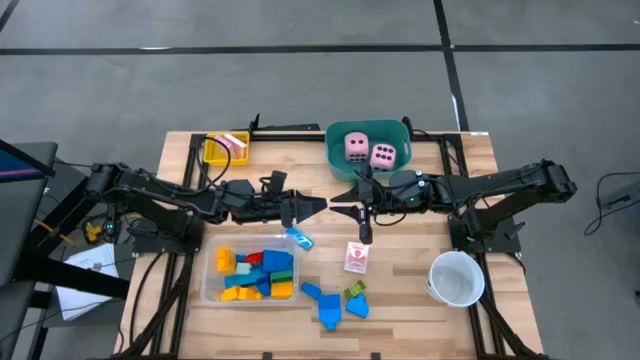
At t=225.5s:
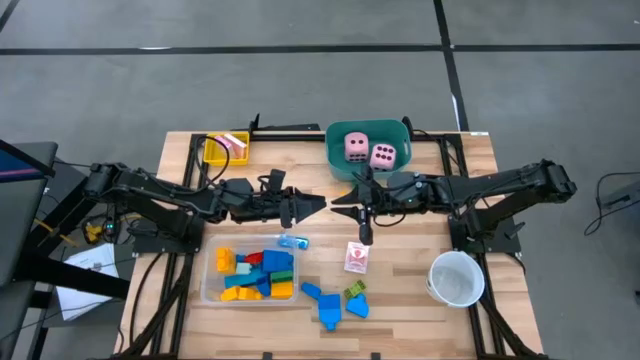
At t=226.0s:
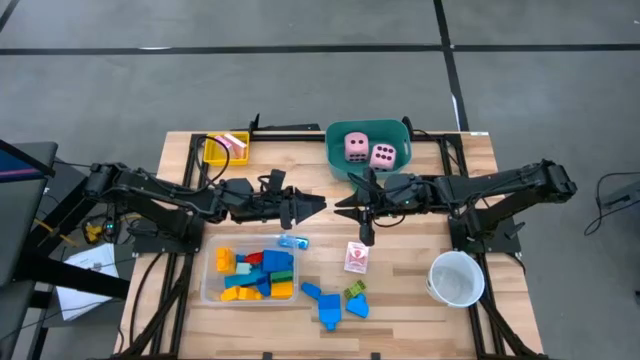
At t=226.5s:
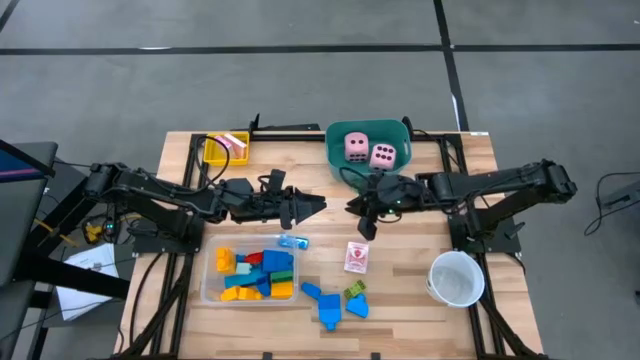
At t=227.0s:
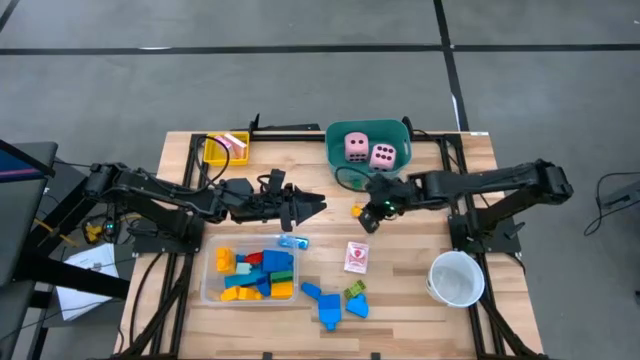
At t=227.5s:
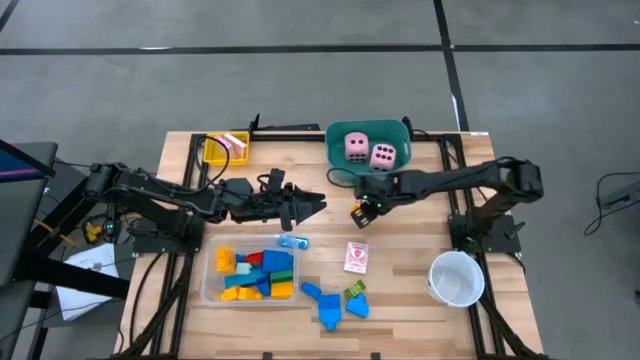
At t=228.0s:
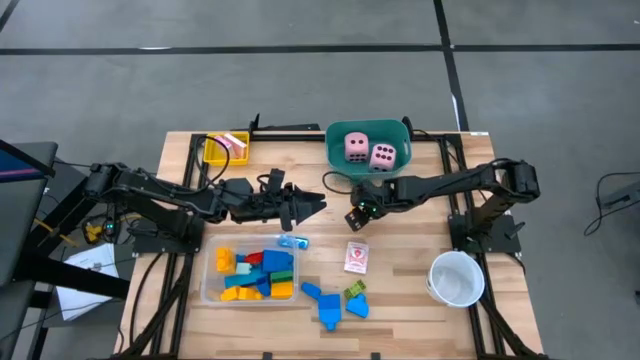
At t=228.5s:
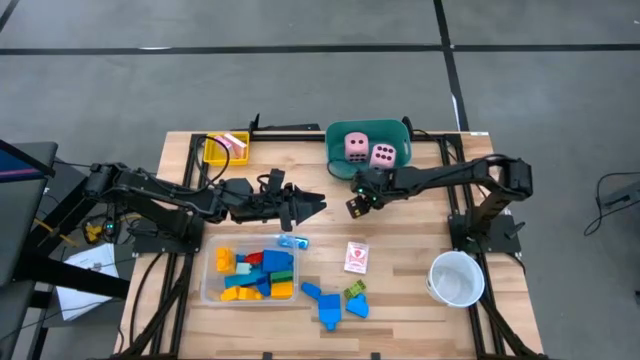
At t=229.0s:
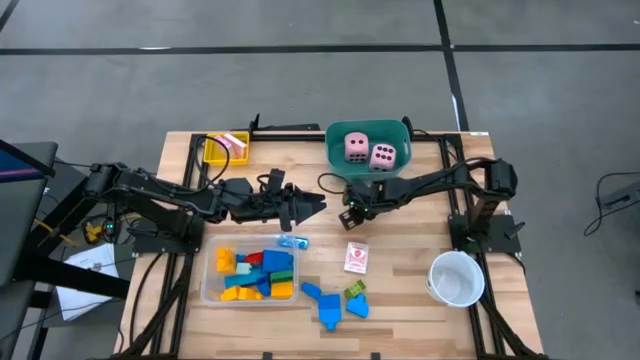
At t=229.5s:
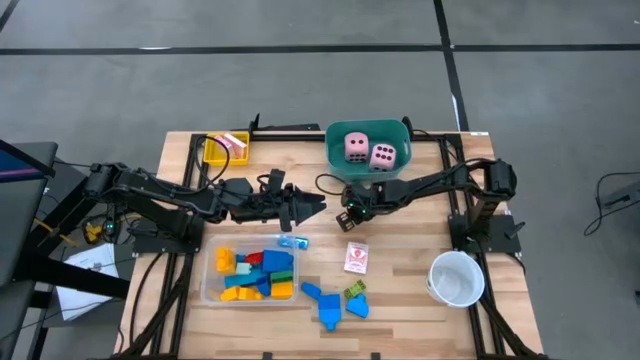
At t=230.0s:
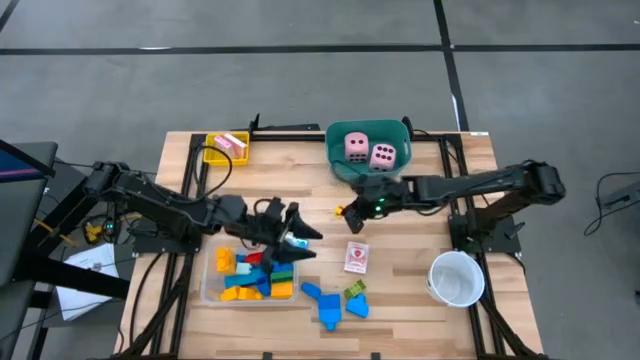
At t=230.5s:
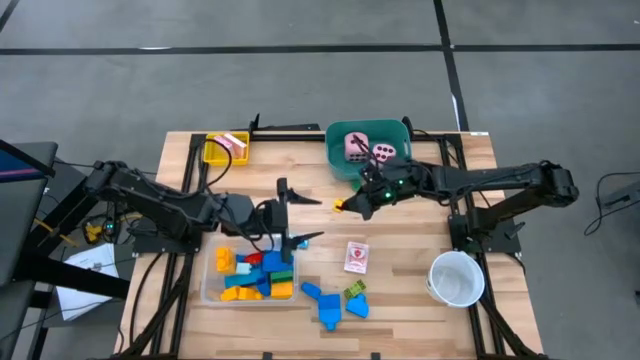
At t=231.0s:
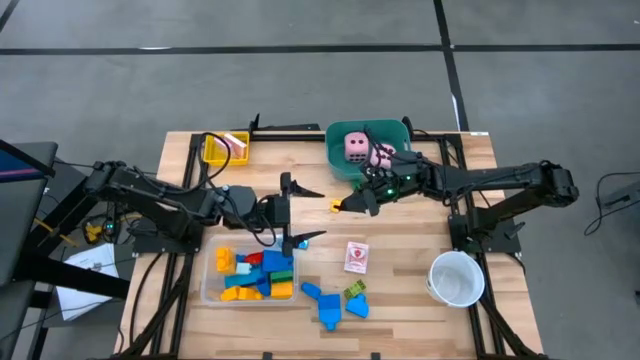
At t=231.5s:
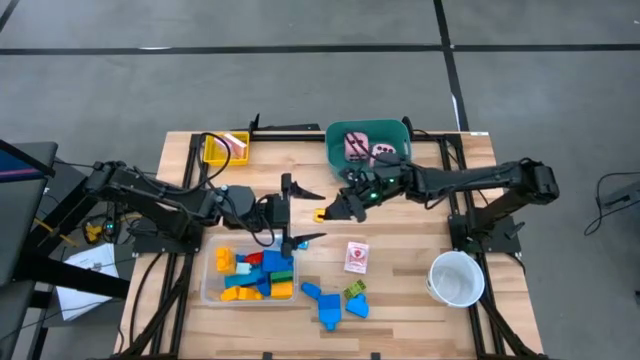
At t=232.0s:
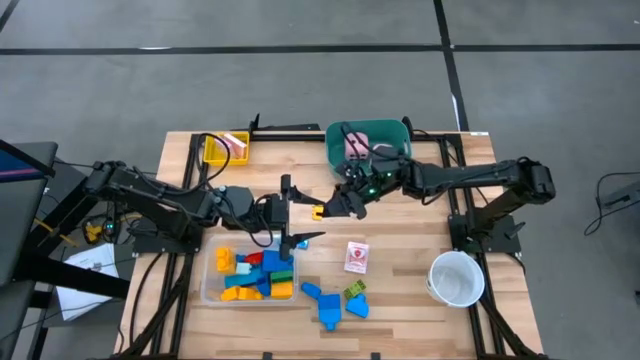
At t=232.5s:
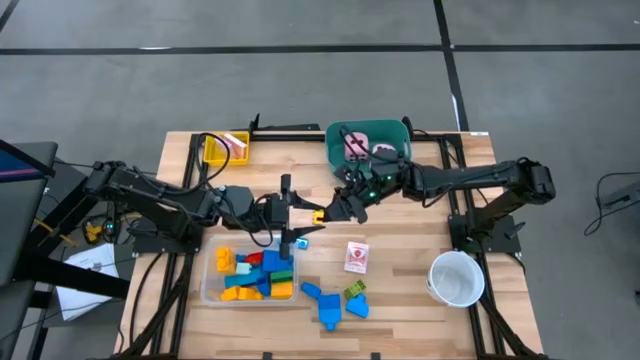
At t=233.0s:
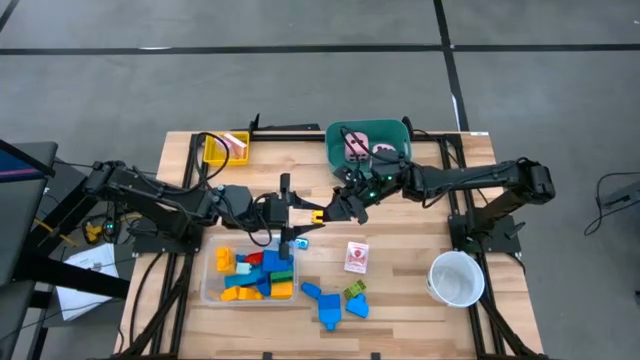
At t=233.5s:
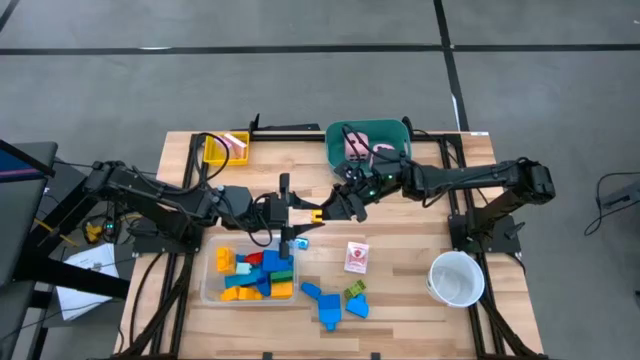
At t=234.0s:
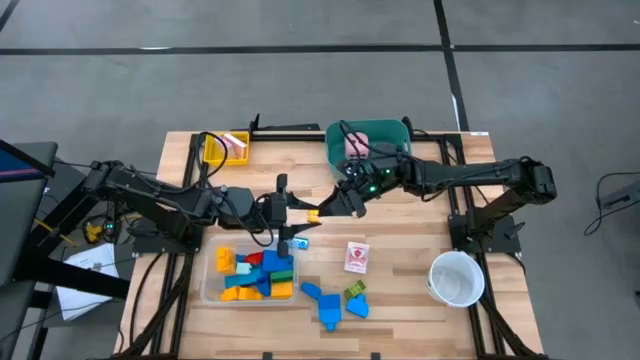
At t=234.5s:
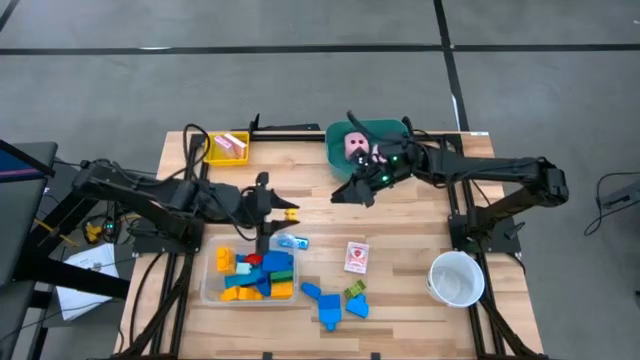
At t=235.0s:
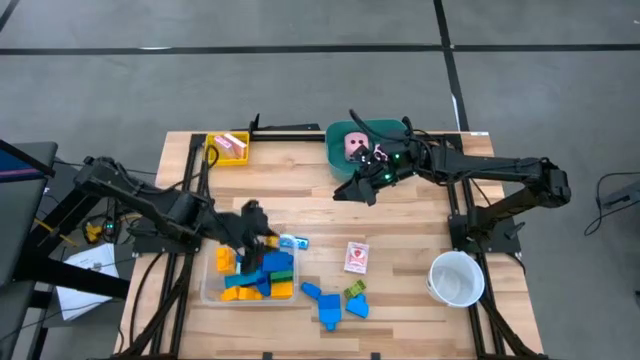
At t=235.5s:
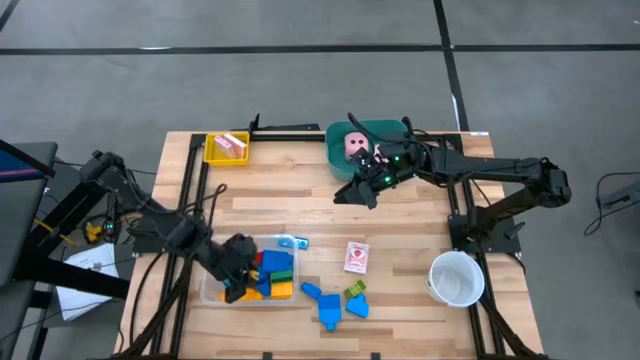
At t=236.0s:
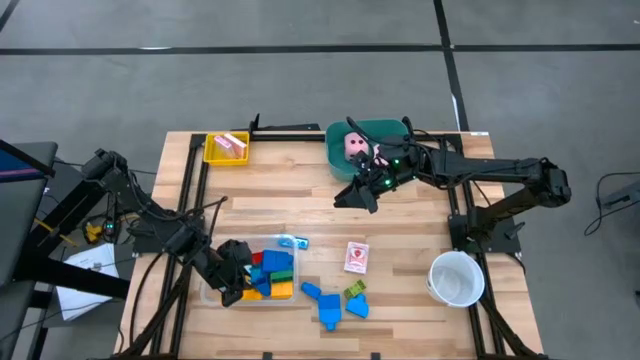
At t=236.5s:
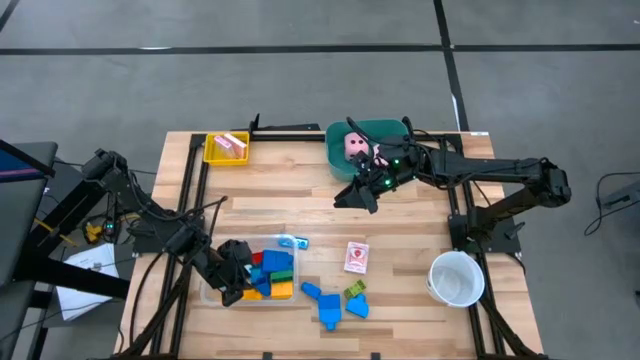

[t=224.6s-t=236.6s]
Task: Pick & Place Toys
Put the yellow game piece into the transparent bin

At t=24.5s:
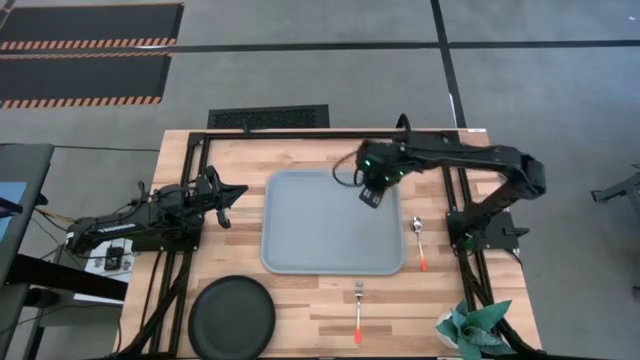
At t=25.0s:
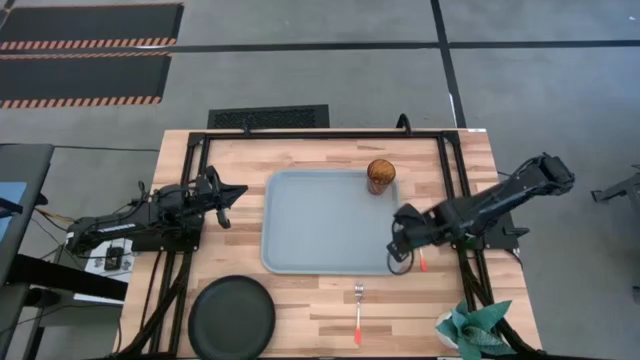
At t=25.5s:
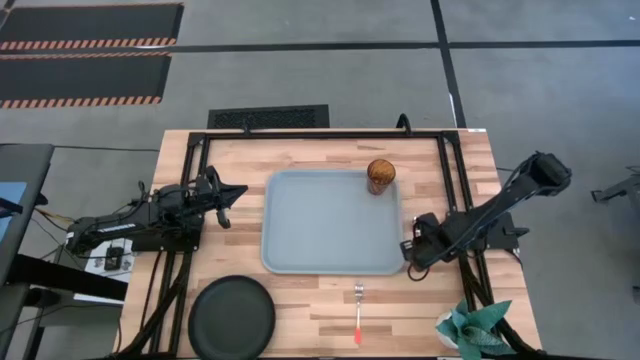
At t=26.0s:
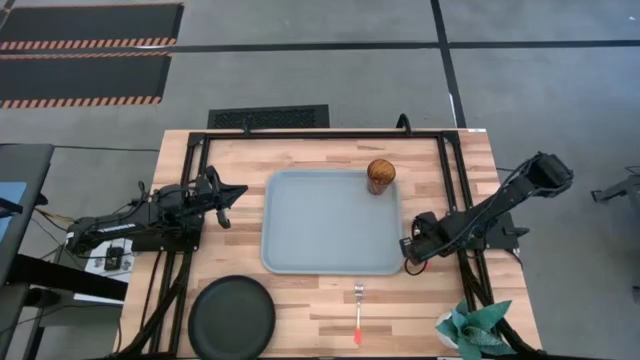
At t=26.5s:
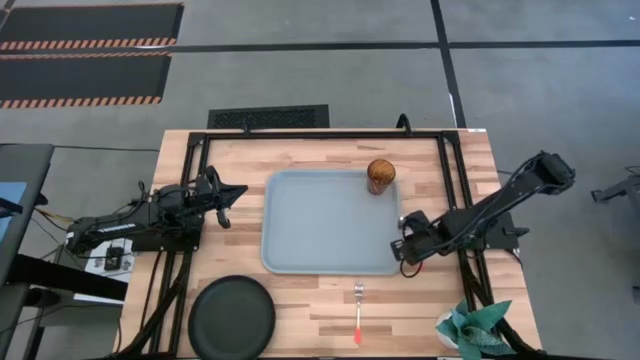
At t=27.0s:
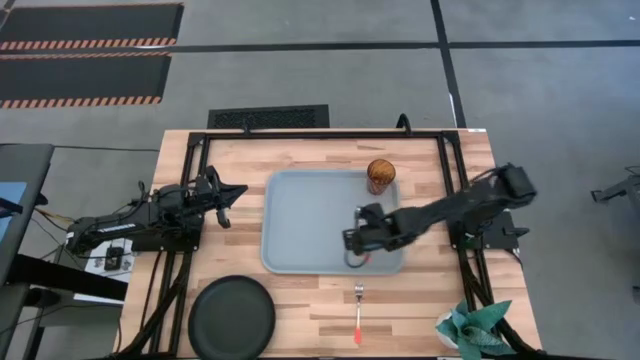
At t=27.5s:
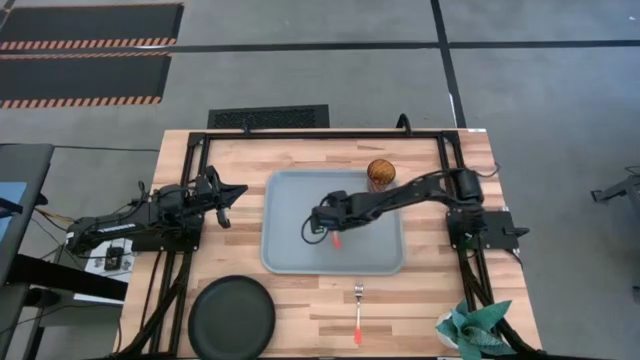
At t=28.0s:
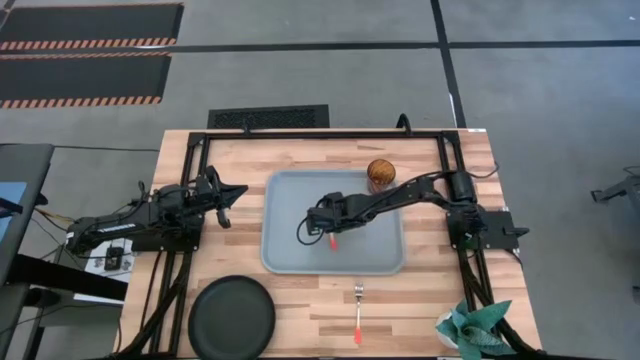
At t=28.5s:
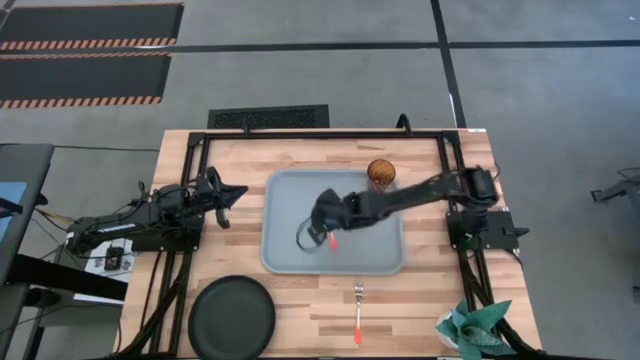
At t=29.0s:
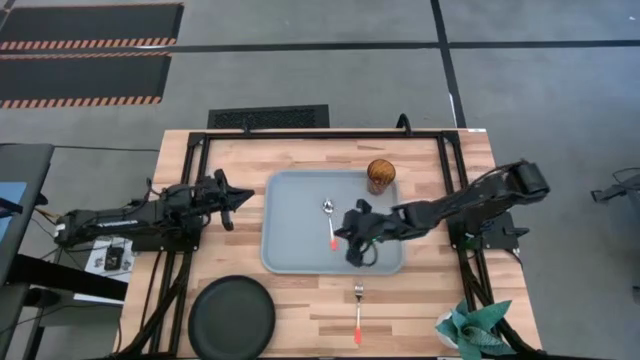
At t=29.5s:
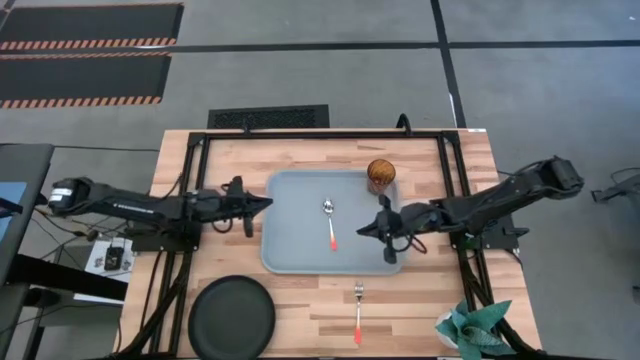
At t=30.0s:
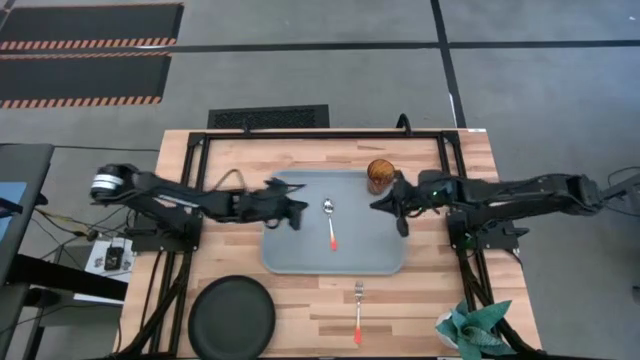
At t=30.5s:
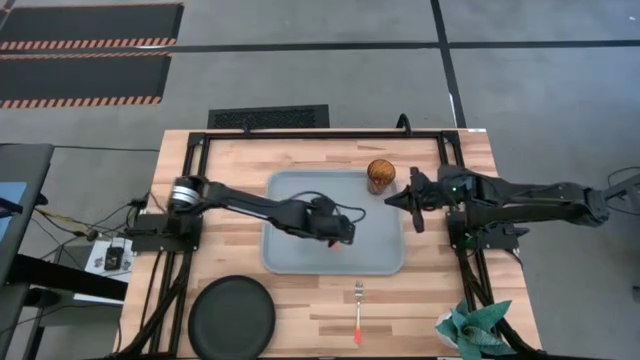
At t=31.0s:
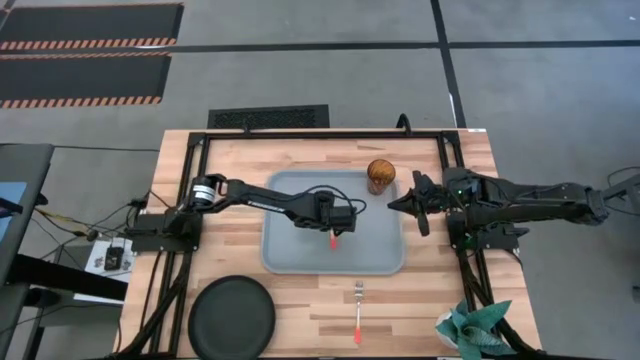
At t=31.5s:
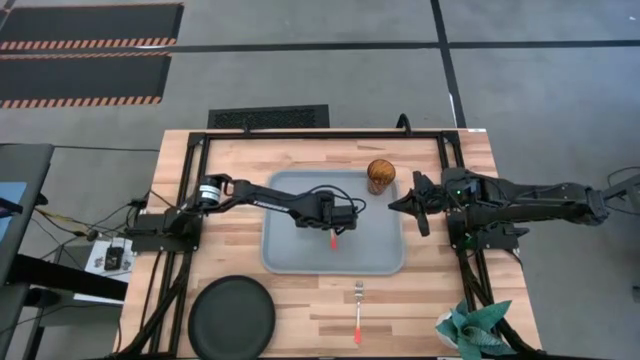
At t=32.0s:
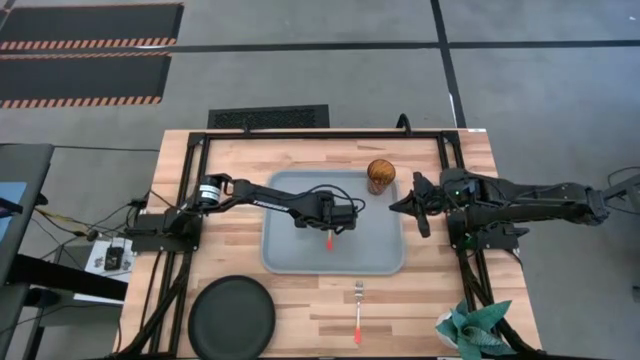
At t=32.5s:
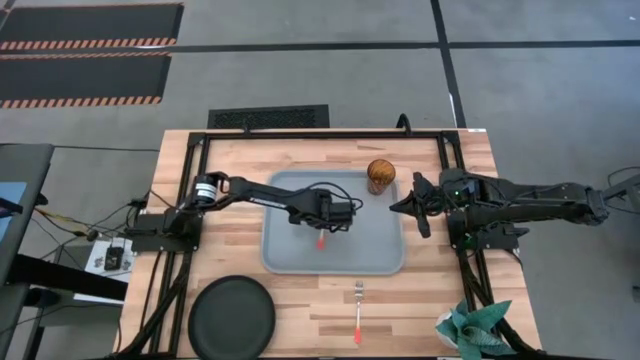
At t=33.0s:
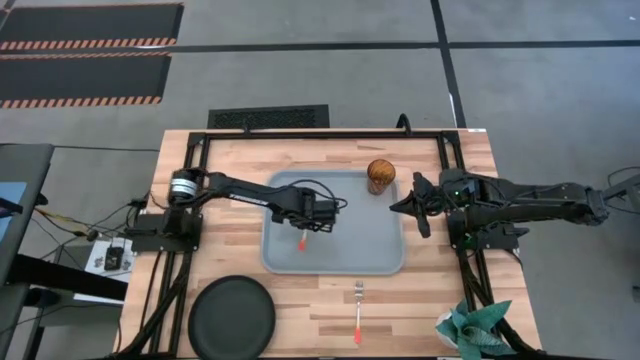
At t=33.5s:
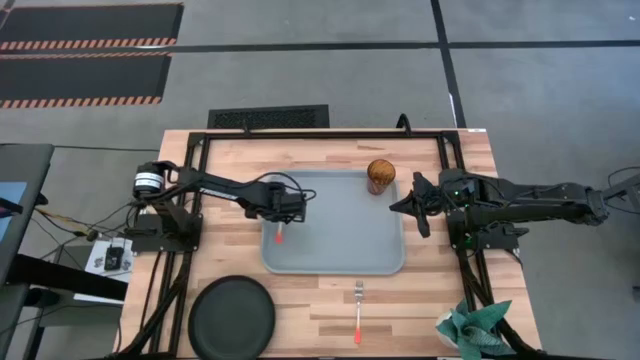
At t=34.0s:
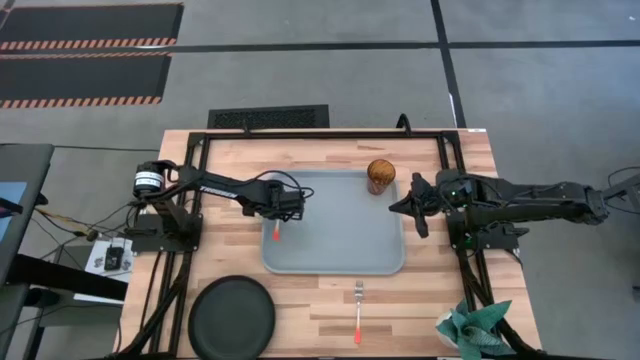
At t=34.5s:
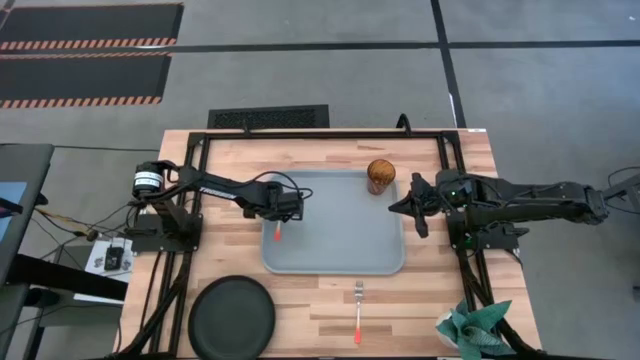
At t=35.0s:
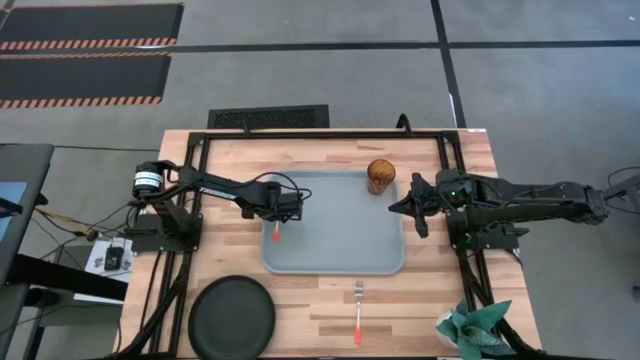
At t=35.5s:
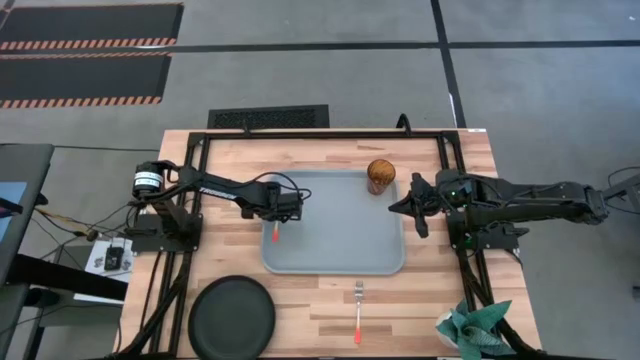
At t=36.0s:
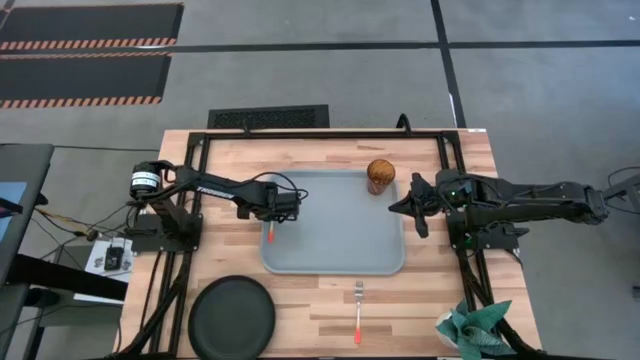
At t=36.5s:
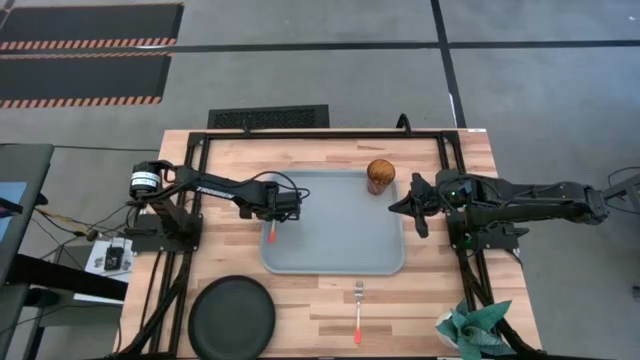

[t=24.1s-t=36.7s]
Task: Pick and place plate/cup/fork/spoon on tray
Put the orange spoon on the left side of the gray serving tray
